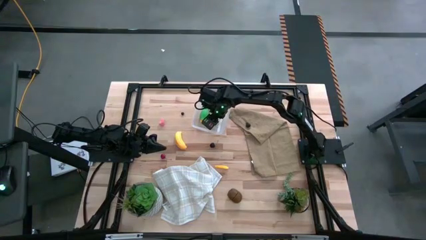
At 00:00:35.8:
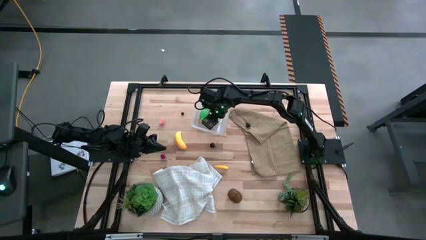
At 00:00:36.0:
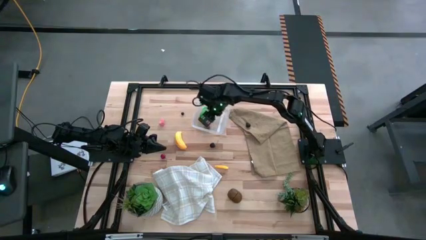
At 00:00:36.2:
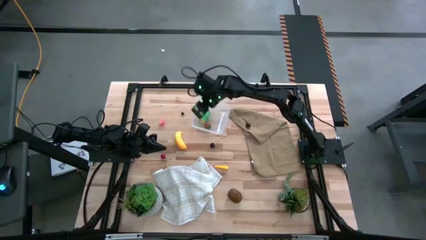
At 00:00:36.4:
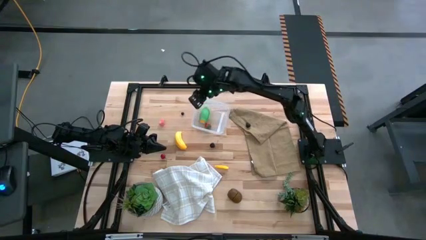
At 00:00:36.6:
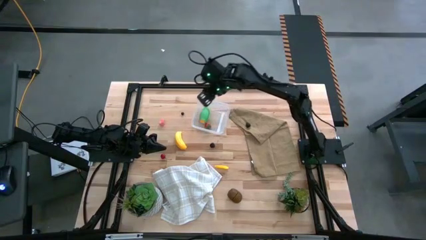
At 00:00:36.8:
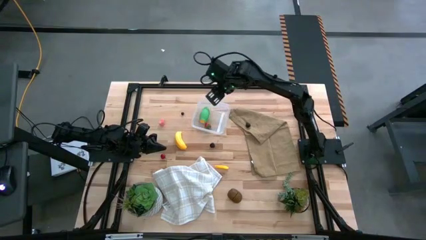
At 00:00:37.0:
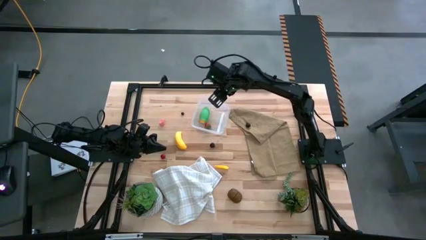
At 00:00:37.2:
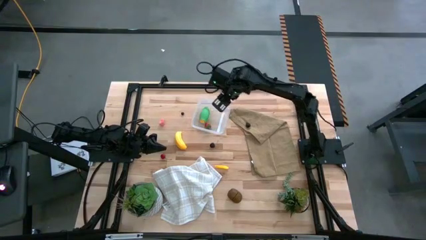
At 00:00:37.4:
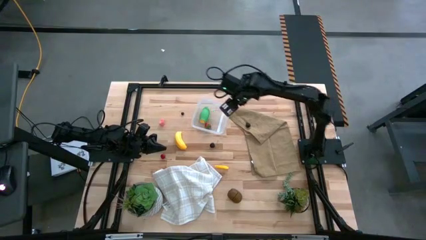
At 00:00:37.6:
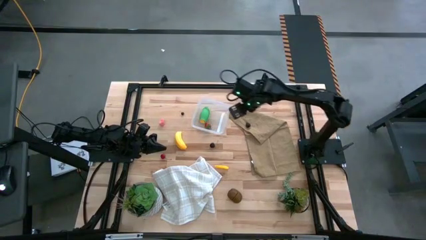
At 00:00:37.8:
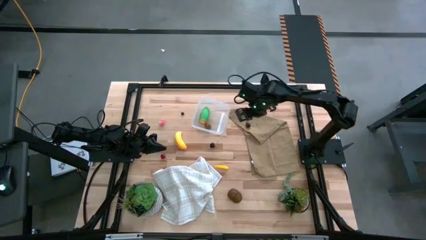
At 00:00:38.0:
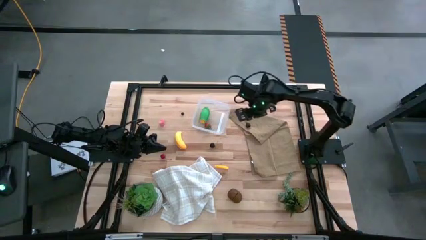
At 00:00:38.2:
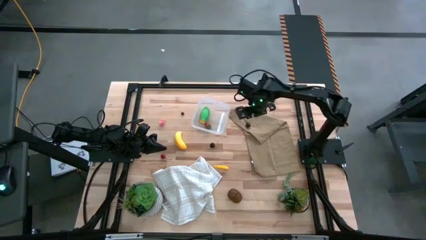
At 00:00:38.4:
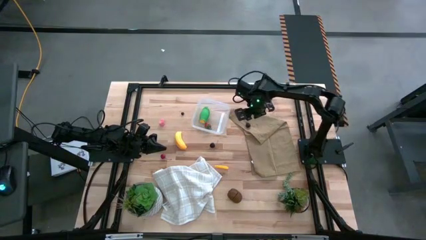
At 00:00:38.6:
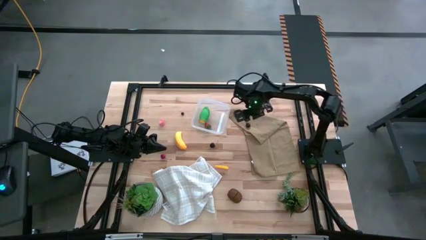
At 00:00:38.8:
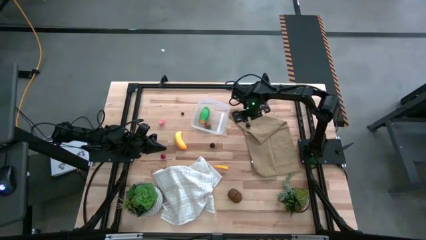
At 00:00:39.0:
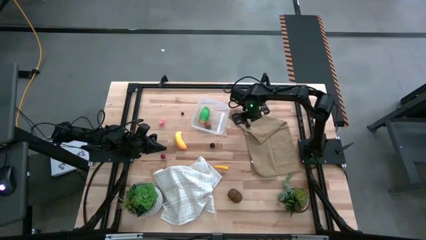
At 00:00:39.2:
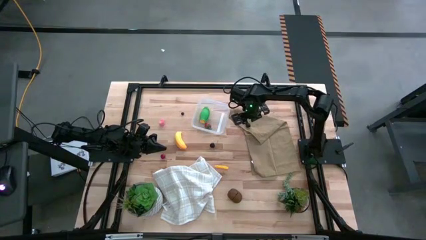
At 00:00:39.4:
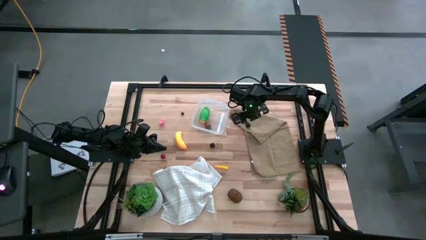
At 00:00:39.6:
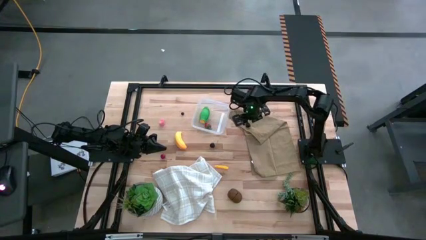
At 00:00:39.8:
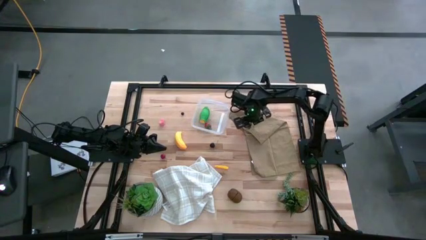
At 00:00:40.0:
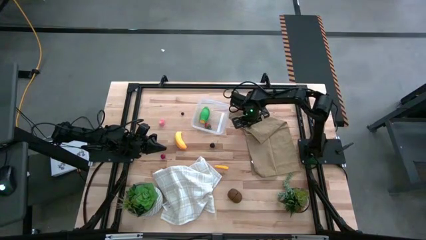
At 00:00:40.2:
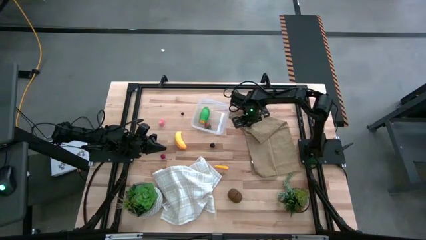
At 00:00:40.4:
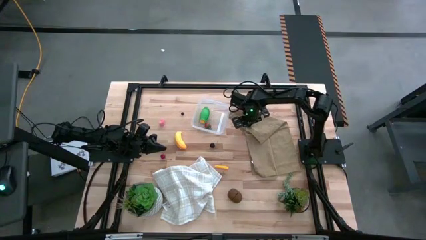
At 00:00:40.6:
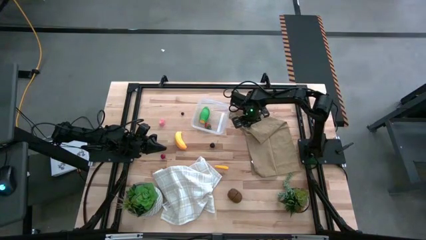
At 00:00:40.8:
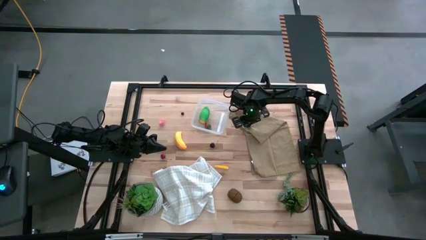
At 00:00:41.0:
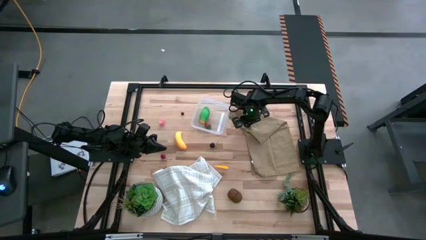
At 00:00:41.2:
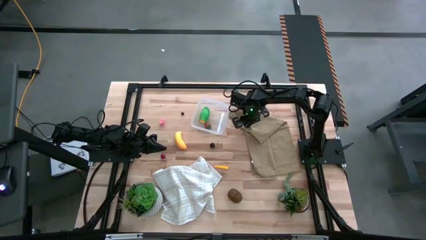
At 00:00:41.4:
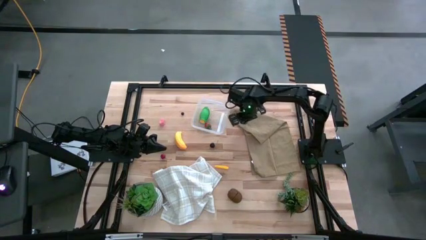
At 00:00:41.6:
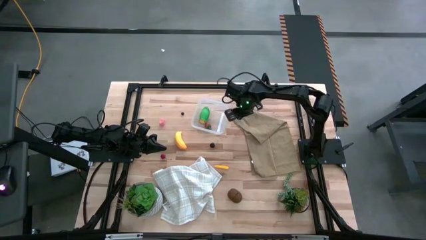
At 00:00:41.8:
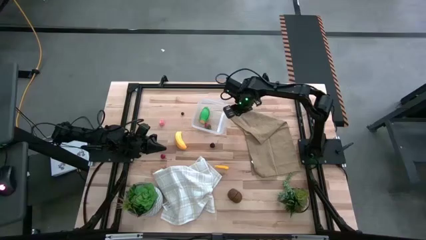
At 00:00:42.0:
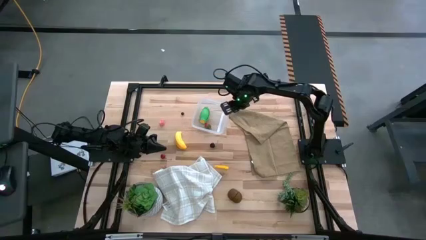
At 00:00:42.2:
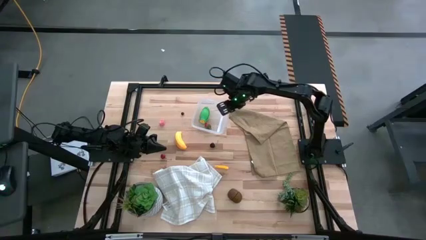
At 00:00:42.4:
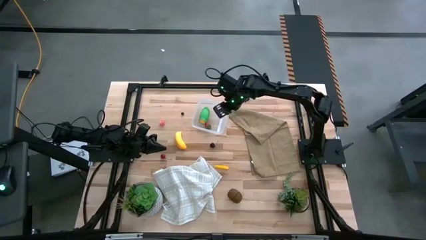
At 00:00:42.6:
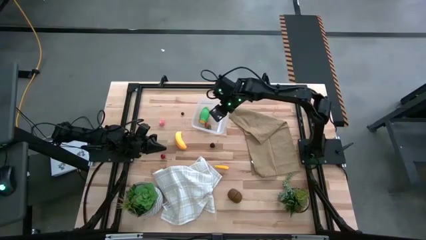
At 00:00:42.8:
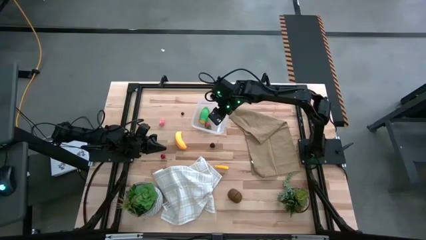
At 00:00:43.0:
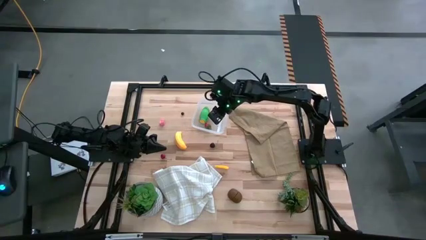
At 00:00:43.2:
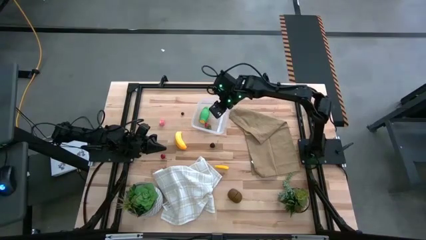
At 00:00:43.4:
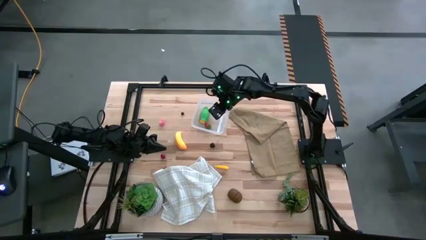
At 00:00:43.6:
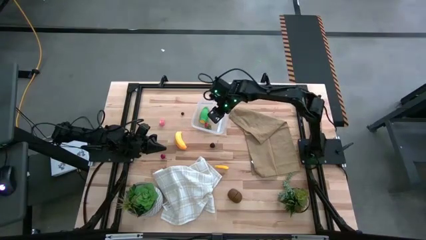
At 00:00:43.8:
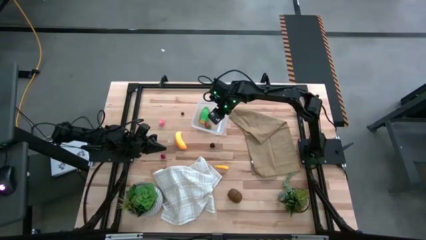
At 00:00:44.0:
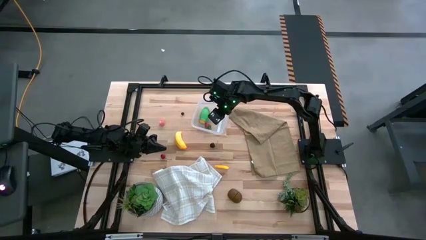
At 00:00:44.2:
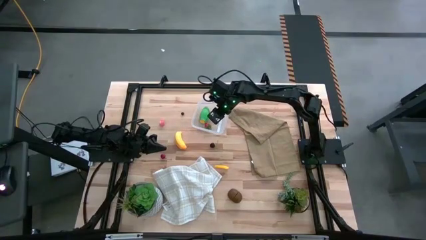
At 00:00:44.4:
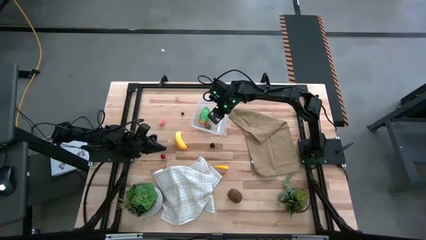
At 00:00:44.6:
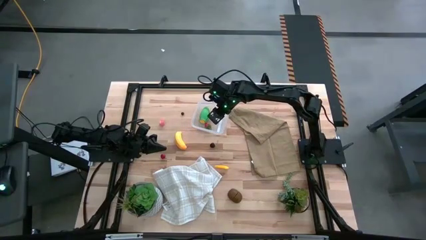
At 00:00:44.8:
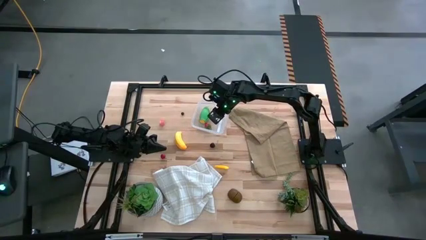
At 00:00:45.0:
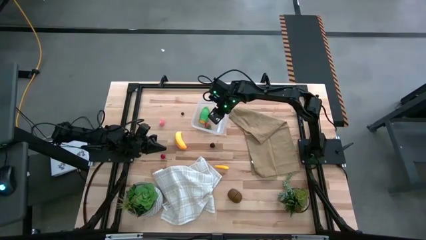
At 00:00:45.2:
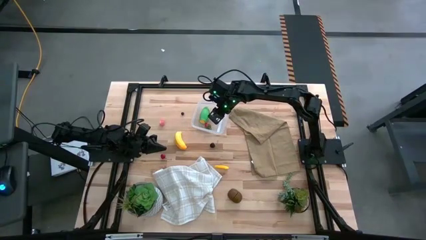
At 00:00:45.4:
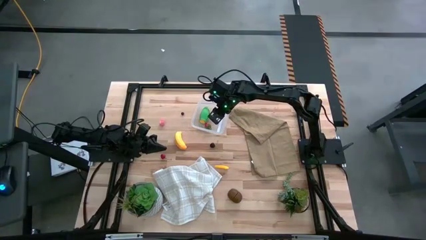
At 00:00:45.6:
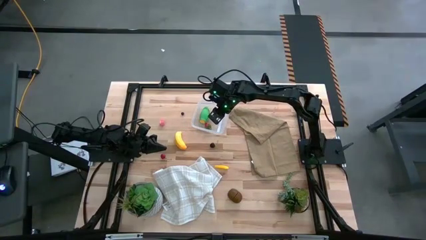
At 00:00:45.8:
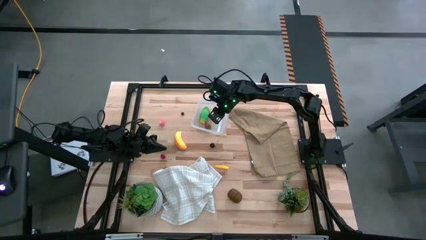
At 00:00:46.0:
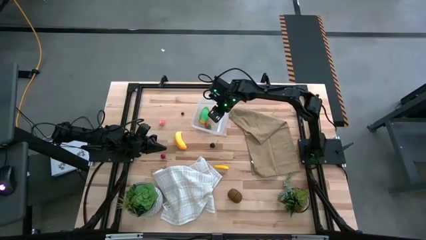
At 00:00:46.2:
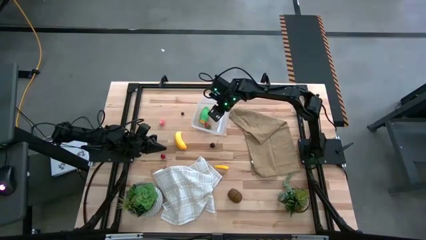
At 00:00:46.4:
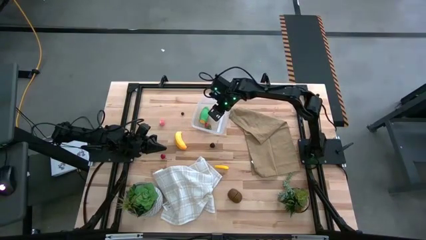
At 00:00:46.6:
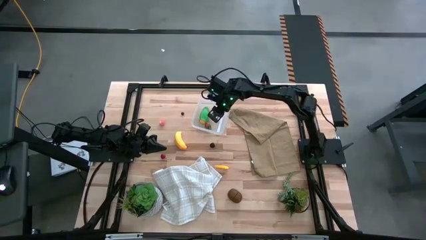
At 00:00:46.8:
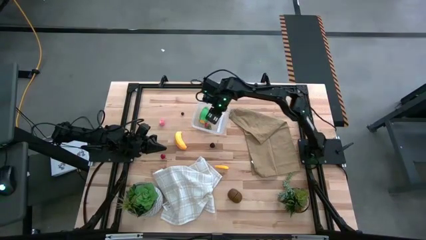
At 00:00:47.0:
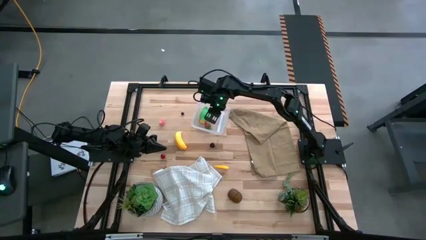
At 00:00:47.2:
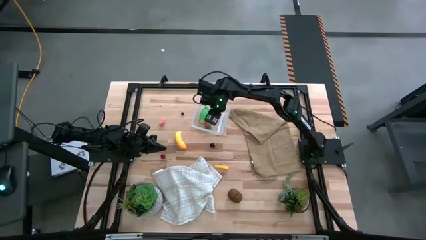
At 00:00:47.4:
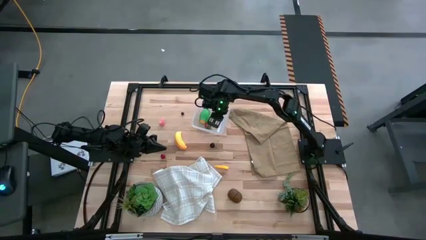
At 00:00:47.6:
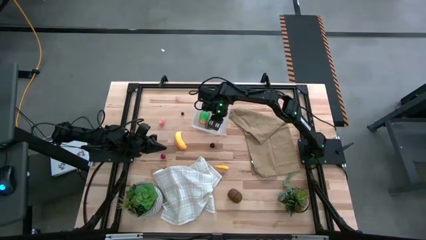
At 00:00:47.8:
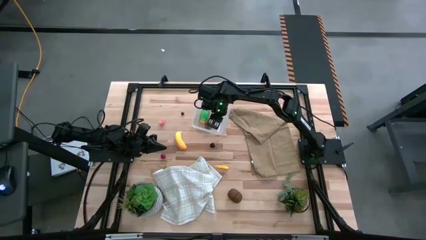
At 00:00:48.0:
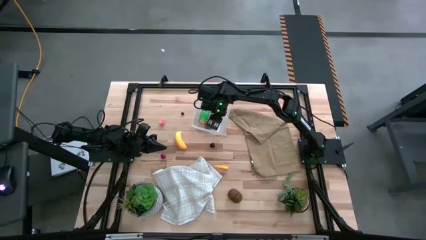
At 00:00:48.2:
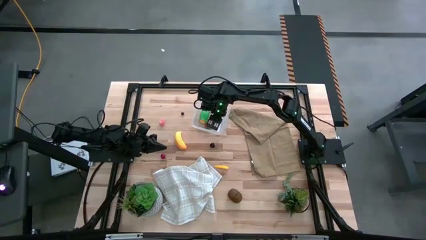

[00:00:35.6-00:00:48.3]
Task: Pick and placing Produce into tupperware
Put the blackberry into the transparent bin
